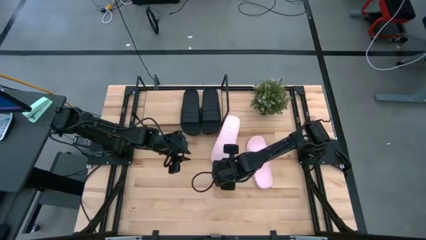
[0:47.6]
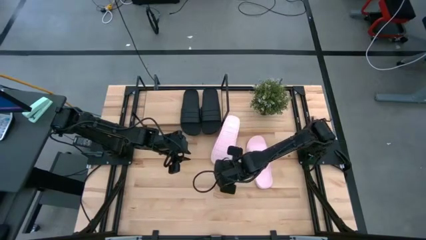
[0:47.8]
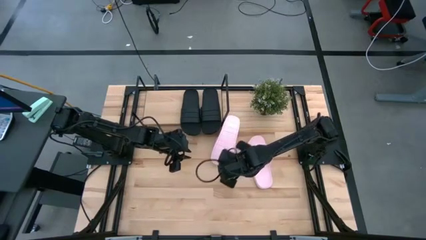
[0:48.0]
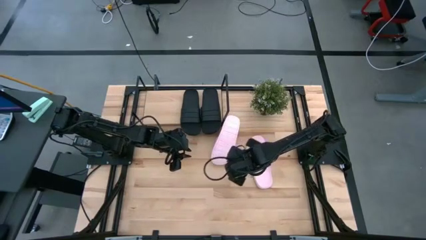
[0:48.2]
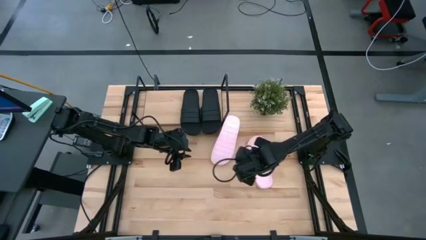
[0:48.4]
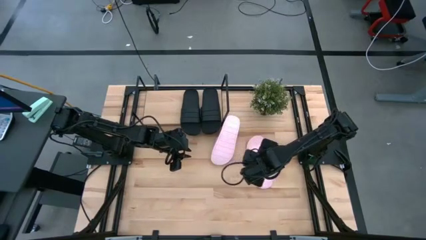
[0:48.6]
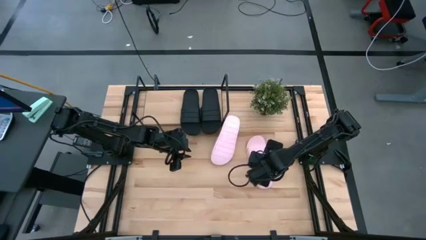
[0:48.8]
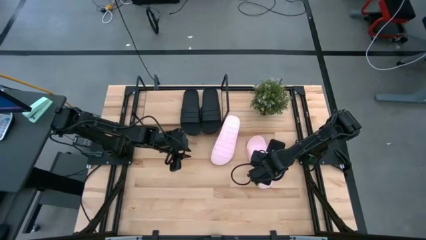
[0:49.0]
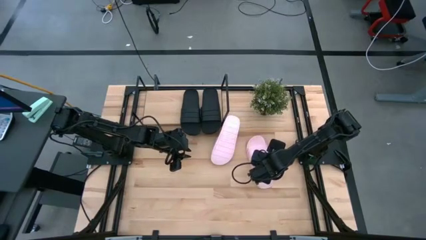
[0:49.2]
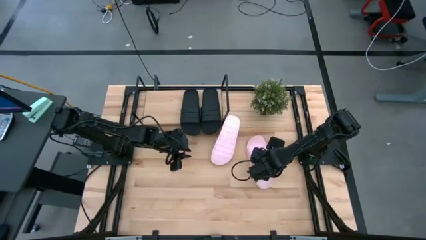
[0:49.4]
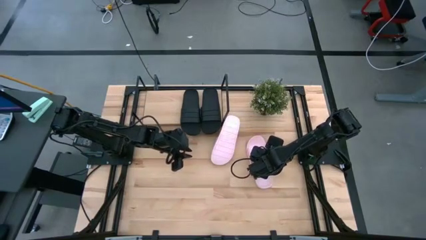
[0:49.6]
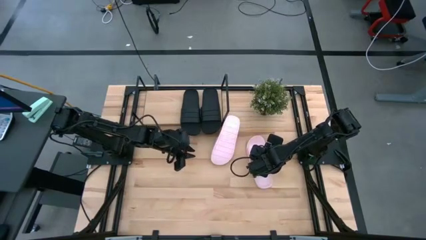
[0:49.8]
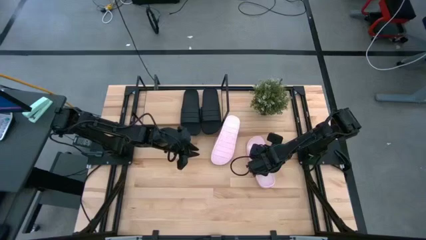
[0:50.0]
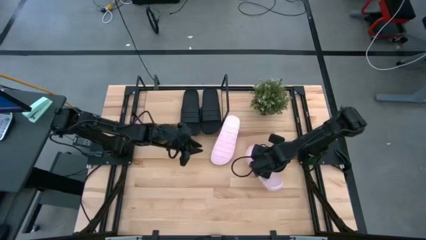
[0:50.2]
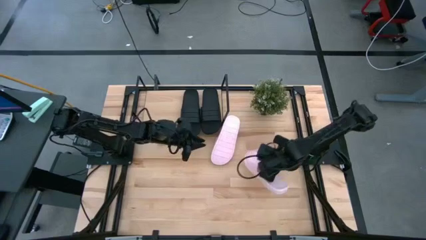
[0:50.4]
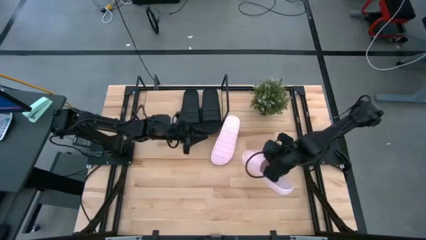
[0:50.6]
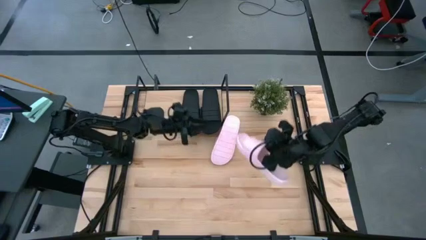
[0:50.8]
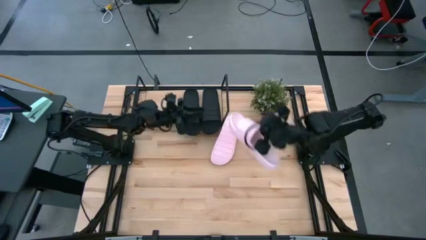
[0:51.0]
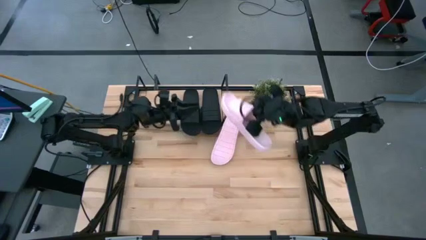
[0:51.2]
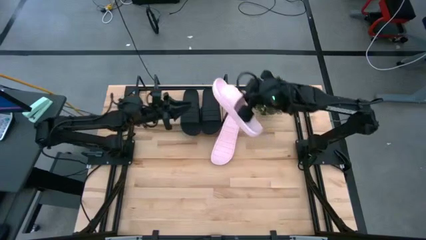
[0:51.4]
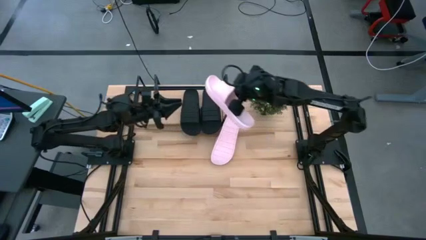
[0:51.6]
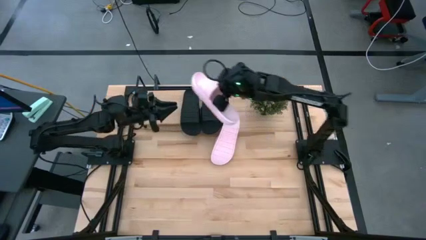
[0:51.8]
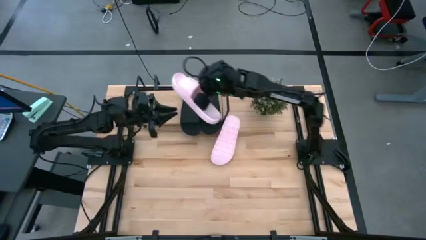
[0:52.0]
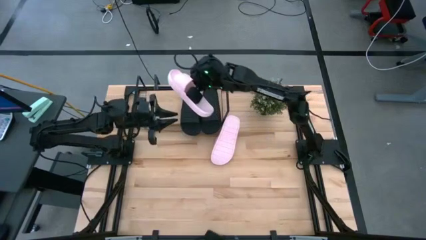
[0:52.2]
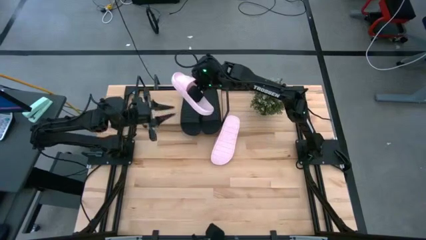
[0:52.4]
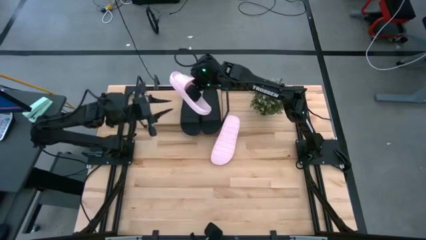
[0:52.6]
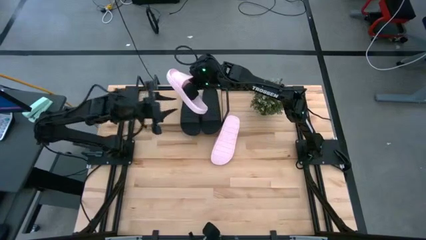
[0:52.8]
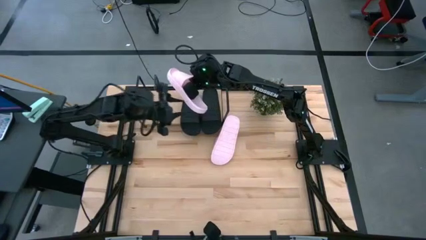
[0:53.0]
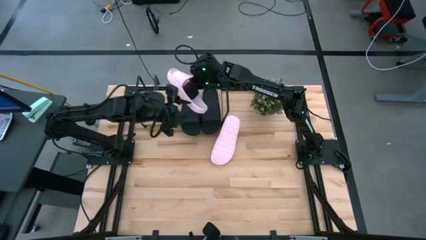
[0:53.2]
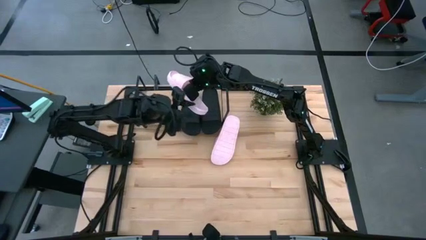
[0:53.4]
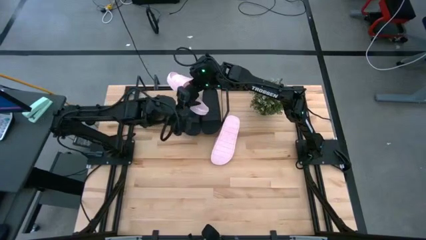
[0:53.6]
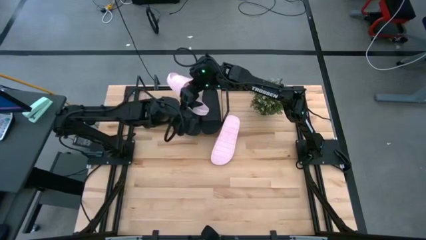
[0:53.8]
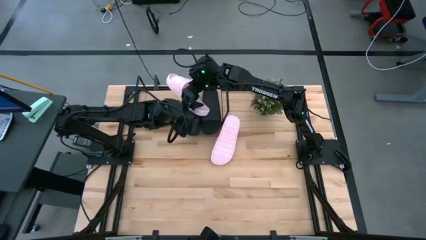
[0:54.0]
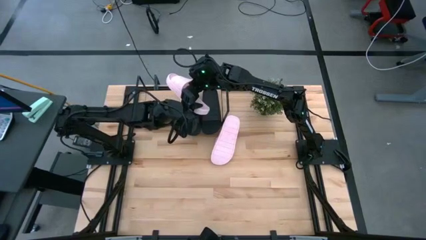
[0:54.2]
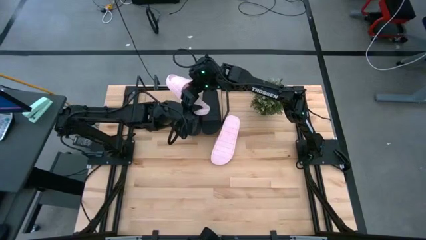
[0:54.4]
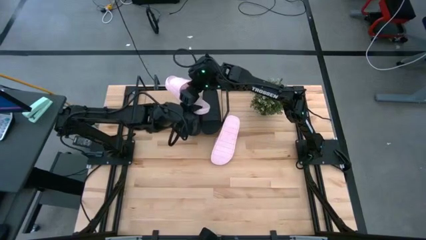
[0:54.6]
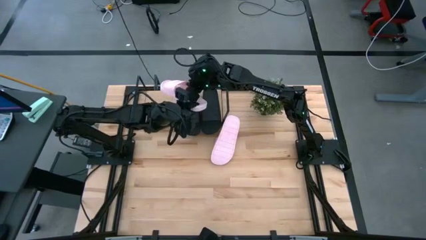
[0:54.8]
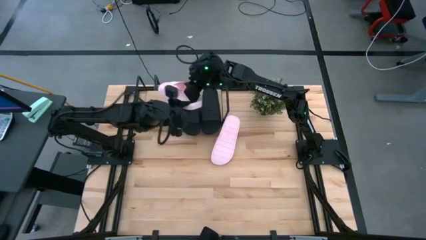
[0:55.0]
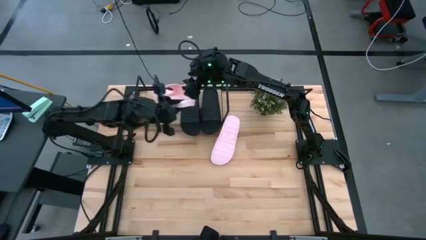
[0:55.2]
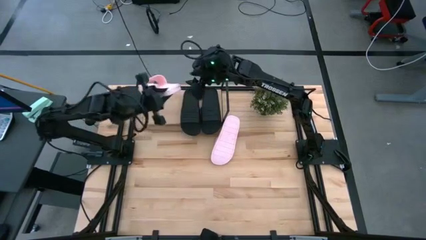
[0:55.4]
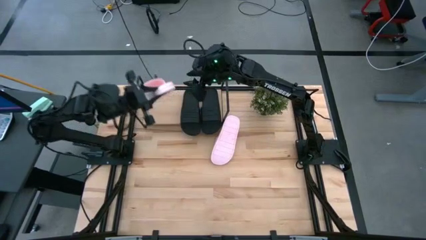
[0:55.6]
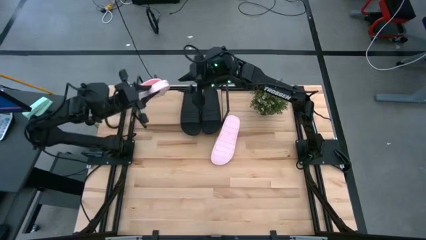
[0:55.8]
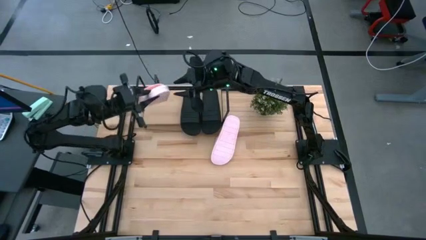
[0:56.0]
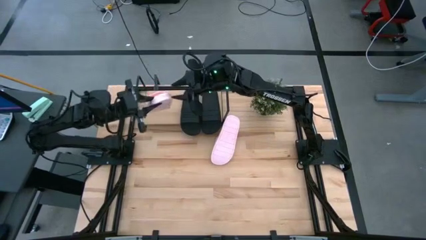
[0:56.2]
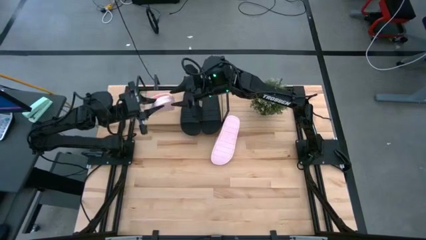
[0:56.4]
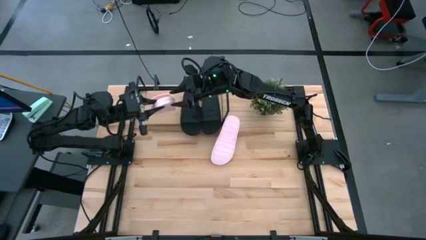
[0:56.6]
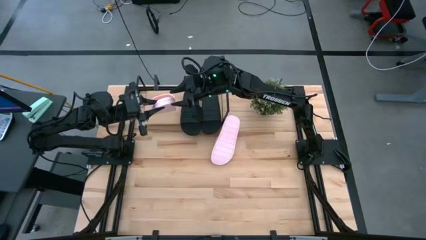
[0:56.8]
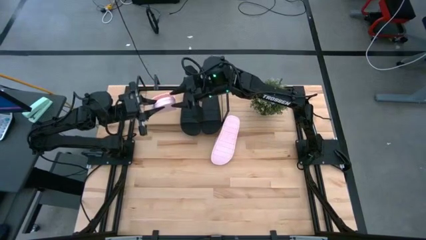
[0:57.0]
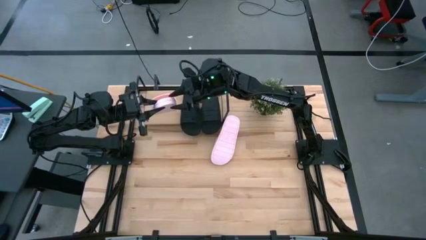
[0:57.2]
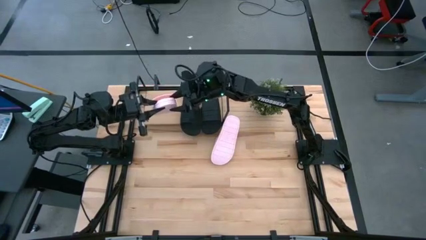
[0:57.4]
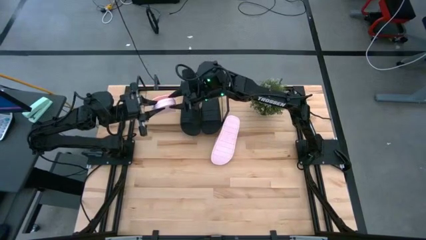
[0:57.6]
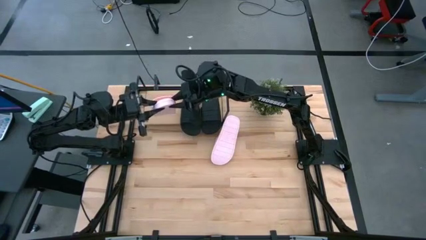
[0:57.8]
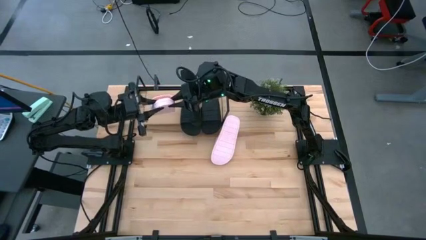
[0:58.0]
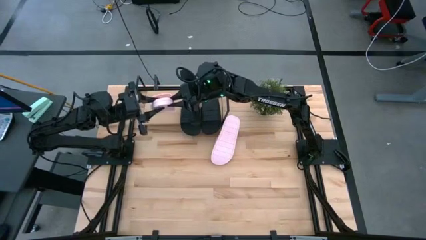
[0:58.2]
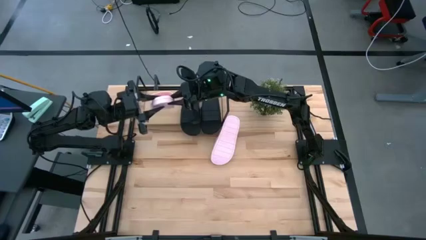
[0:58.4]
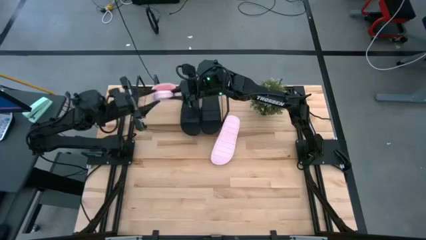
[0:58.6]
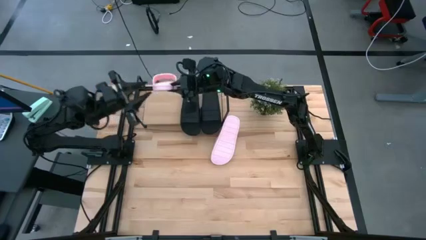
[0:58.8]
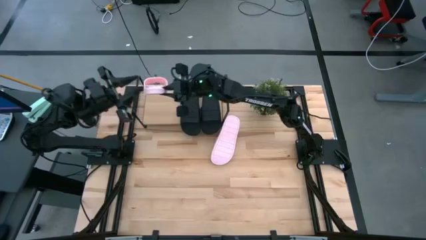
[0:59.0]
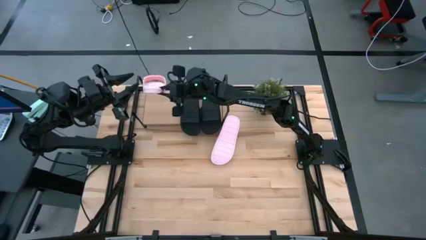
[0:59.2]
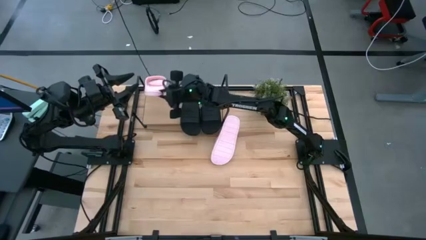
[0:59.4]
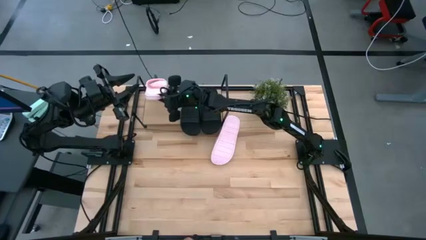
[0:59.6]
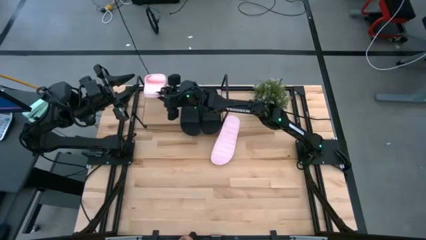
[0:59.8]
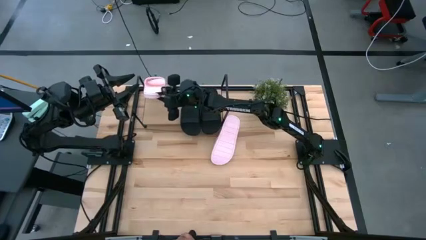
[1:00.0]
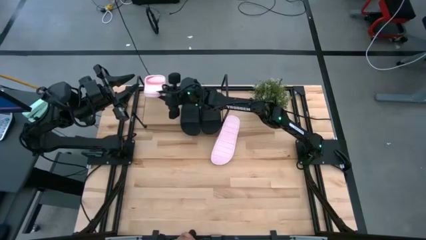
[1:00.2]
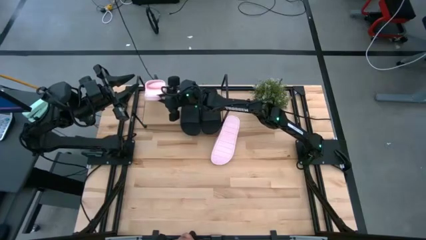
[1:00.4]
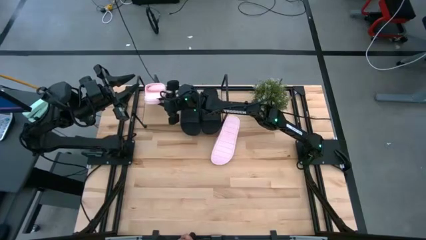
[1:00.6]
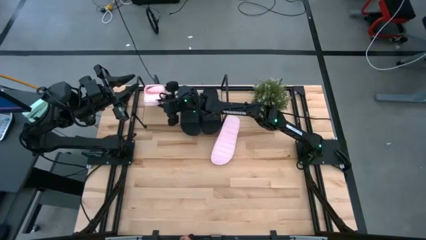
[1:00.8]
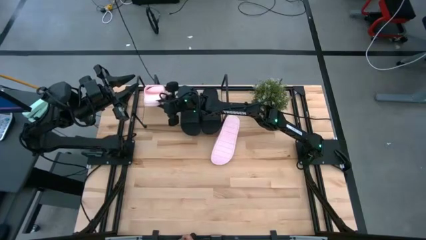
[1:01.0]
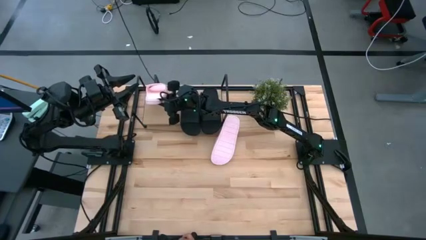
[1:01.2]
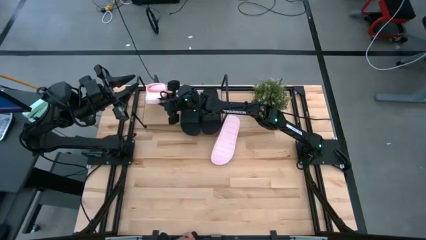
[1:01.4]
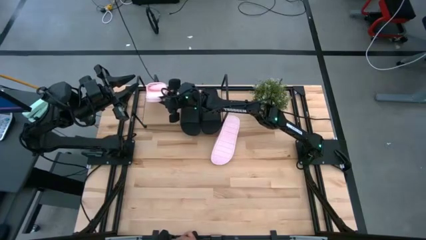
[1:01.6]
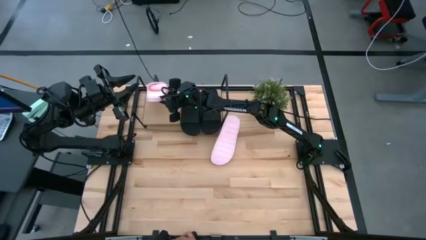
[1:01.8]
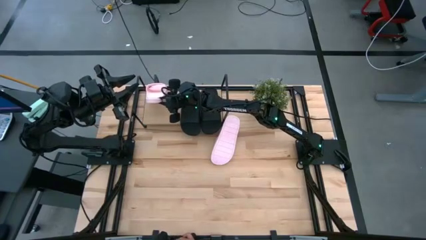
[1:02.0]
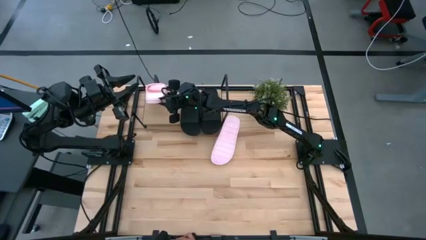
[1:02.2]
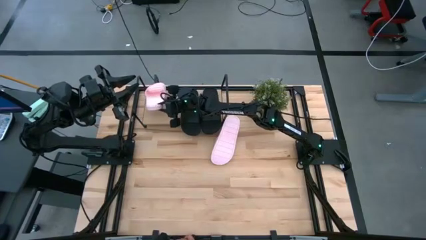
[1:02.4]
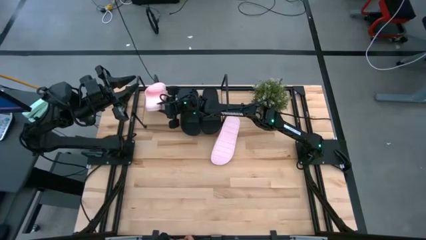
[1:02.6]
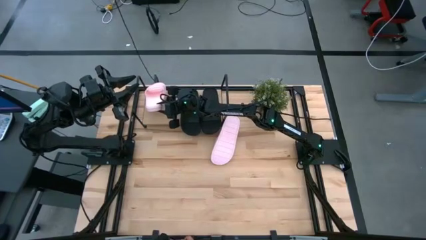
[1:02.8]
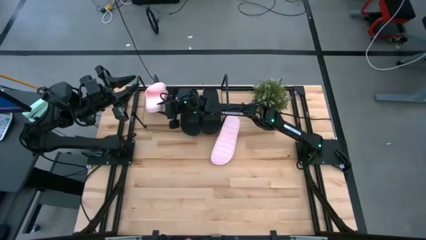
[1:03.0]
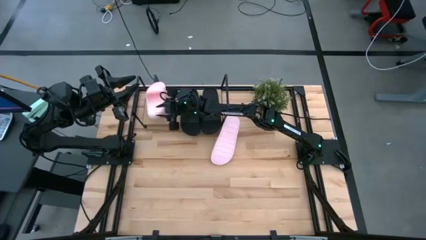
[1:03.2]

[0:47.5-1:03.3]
Task: Pick and place slides into the shelf
Put the bottom pink slipper onto the shelf
